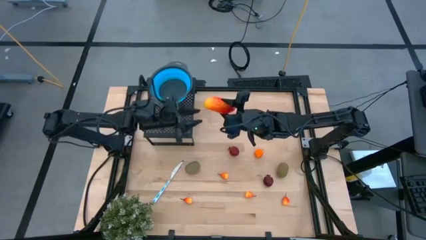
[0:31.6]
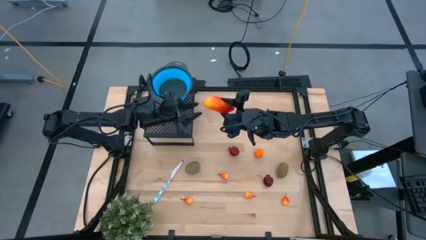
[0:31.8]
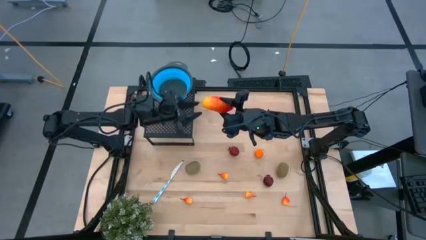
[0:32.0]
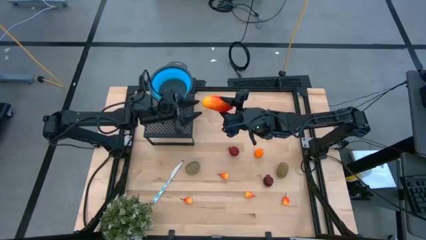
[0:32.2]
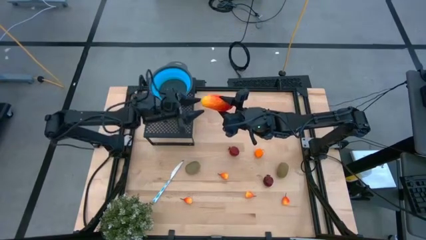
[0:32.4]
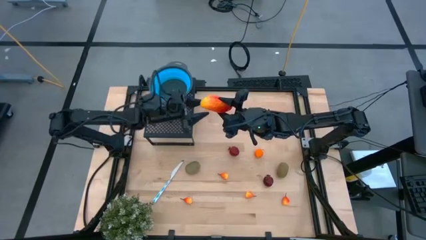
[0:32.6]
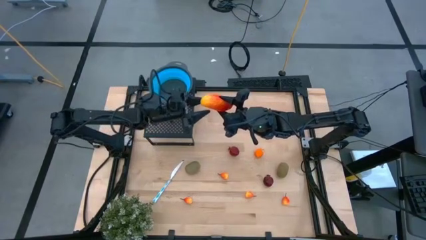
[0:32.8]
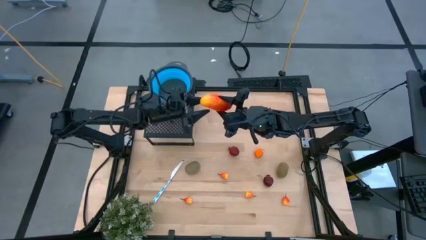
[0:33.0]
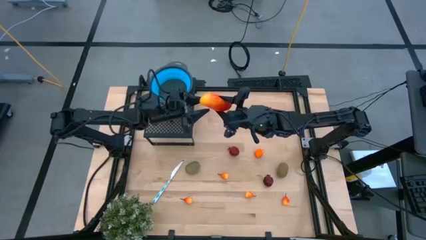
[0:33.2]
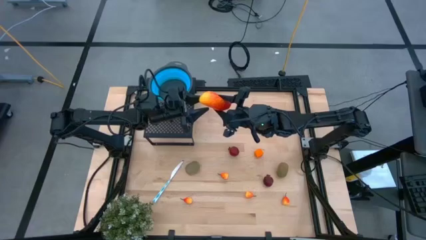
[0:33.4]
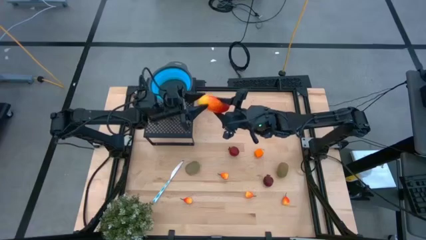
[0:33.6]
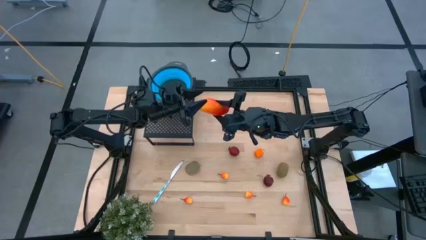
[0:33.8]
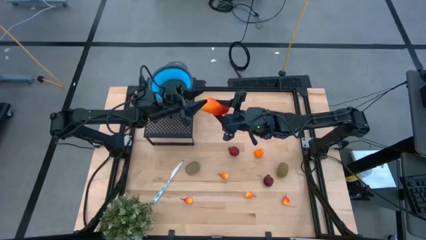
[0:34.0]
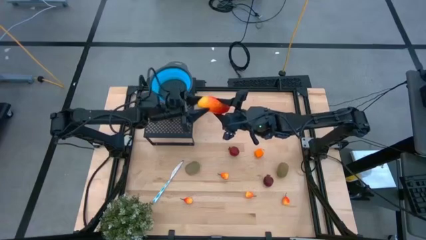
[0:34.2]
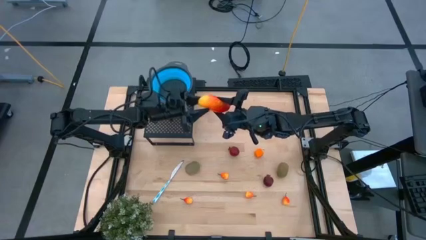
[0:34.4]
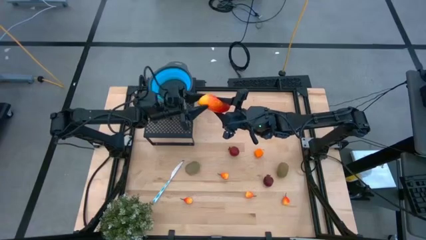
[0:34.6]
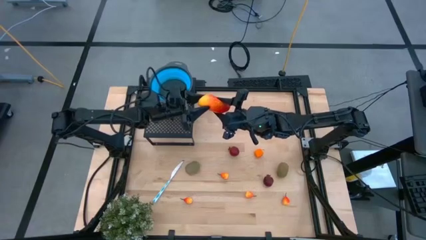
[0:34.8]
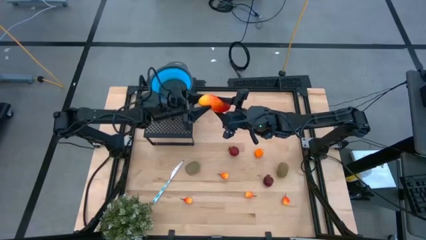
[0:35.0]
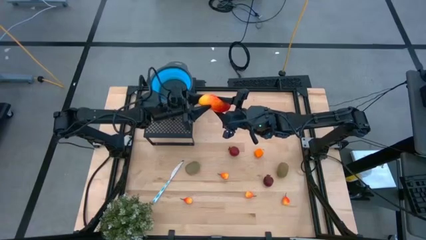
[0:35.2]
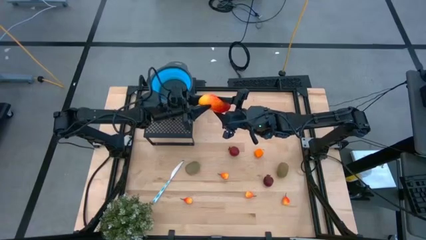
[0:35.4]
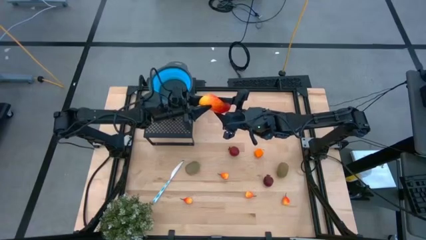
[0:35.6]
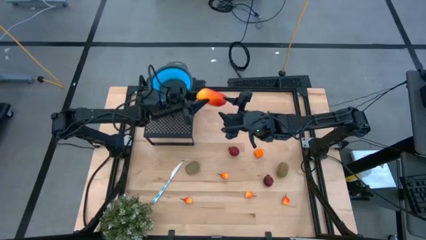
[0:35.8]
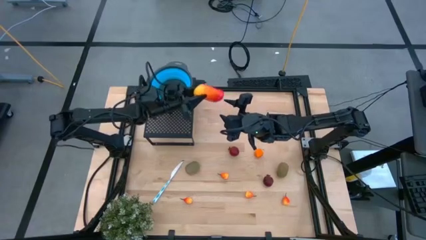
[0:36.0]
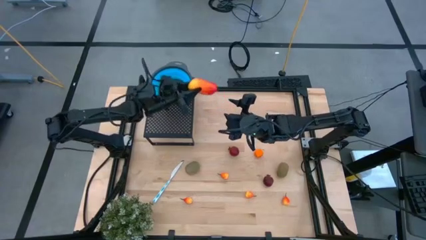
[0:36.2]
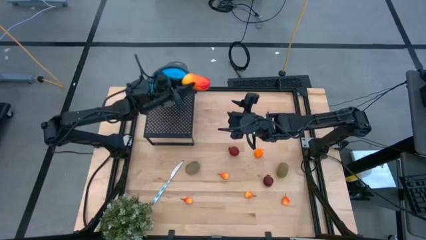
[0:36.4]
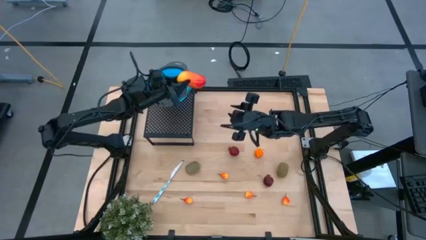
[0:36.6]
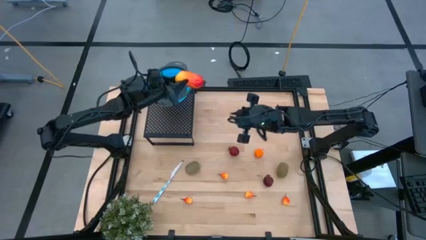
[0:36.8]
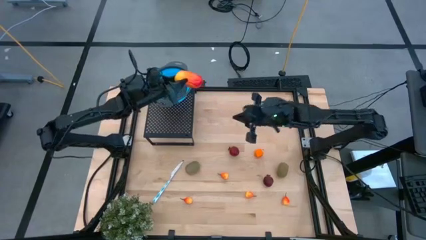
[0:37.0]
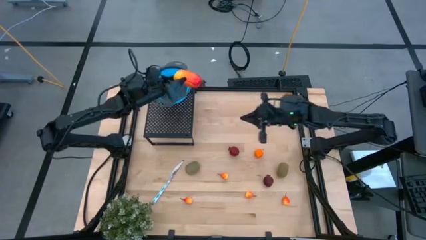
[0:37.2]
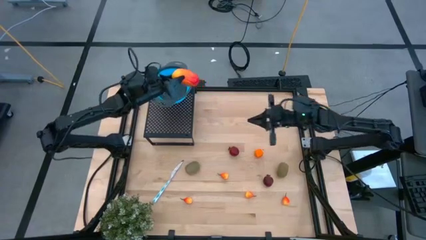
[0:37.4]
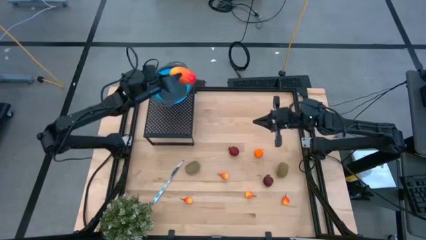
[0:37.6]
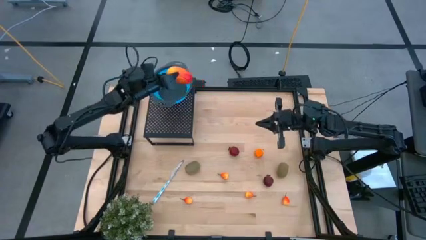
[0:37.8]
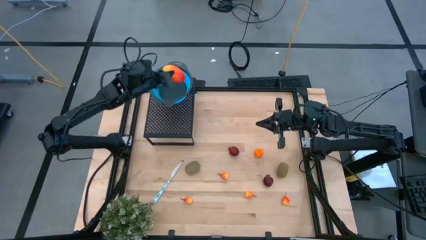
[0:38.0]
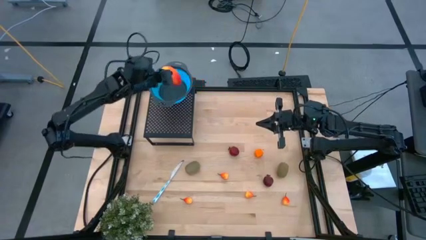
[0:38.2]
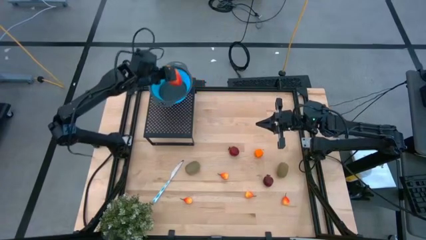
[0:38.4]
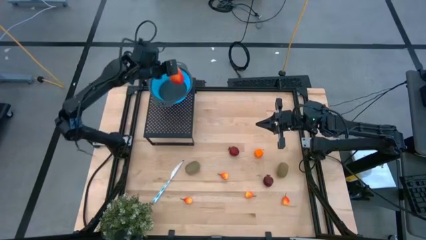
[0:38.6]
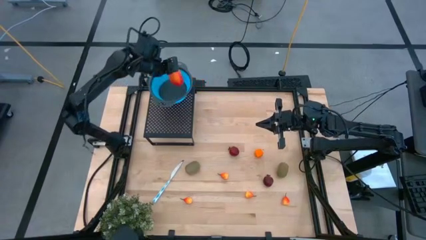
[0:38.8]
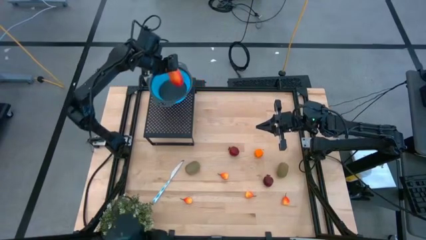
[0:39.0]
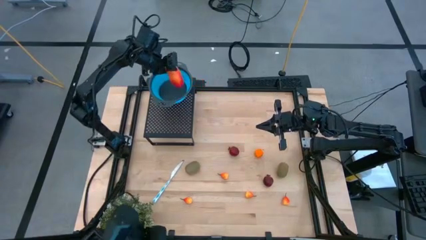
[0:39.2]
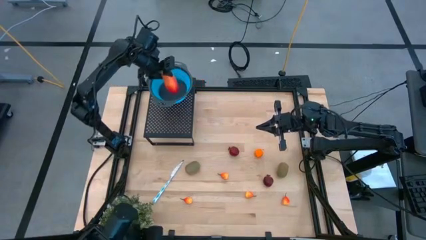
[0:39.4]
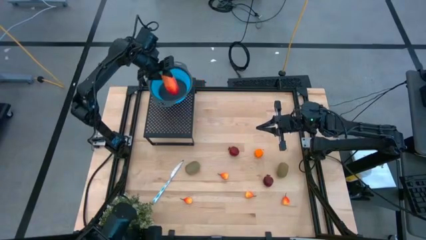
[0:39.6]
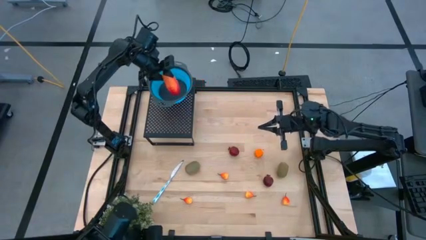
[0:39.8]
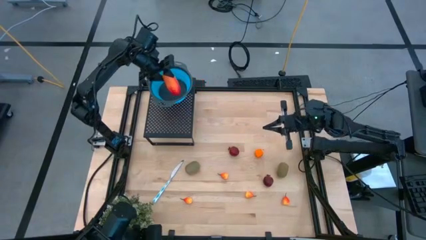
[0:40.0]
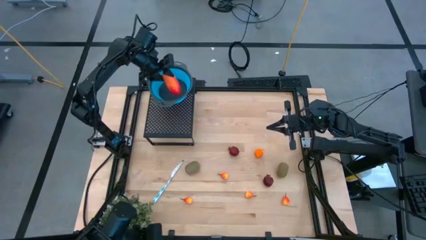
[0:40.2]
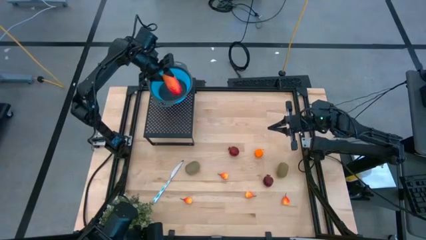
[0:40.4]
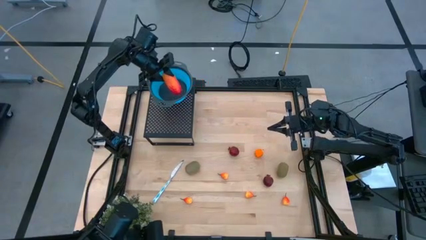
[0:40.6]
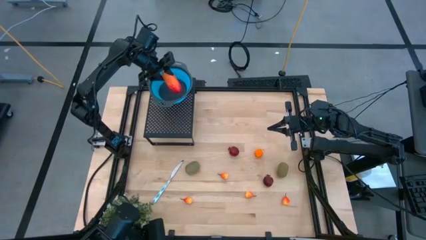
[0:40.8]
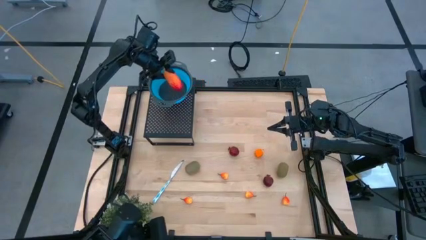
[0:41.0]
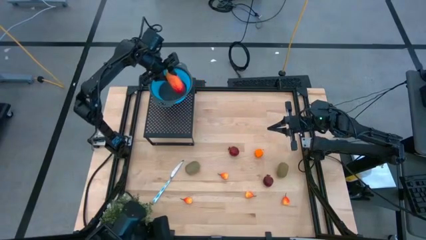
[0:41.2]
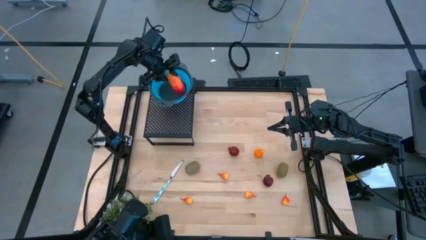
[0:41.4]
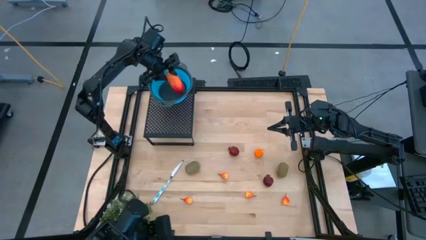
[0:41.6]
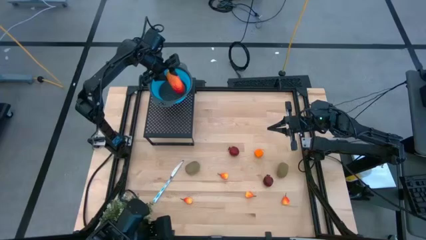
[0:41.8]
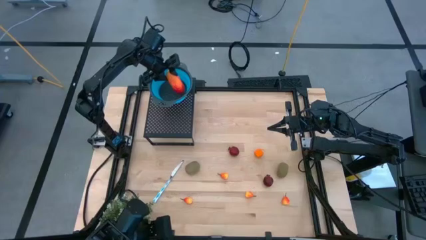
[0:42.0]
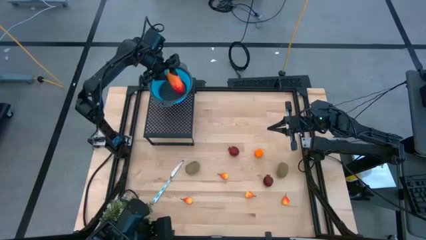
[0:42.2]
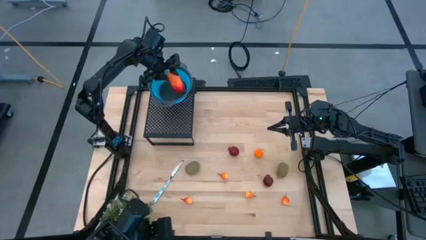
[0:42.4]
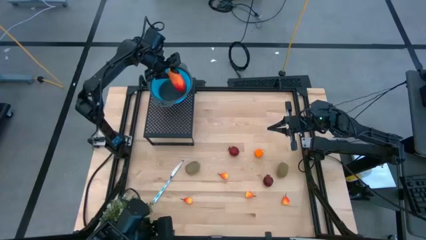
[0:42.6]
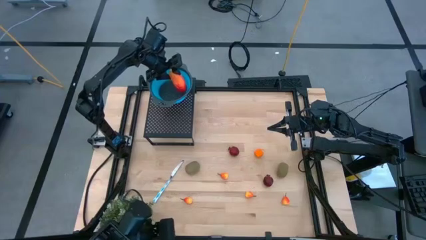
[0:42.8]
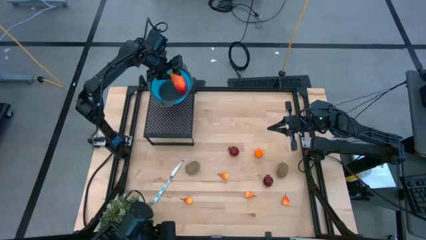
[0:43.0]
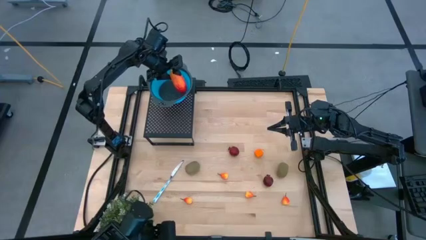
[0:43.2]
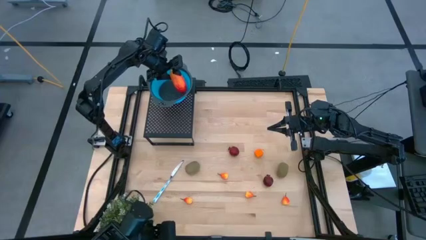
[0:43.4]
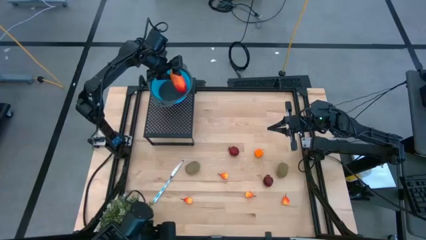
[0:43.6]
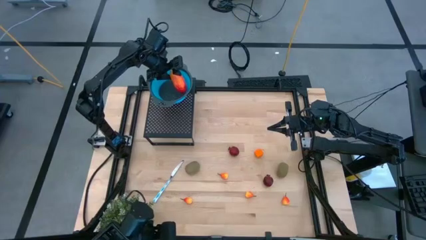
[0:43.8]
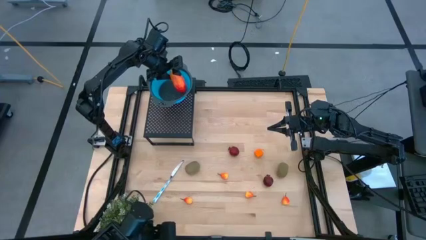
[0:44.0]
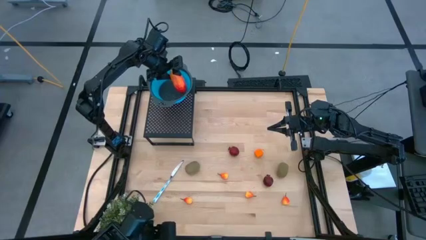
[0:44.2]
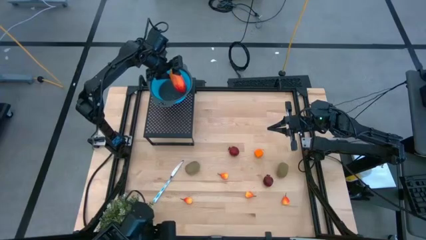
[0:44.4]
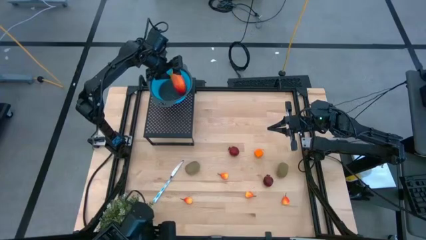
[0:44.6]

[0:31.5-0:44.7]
Task: Pick & Place Fruit
Put the red mango into the blue strainer bowl on the shelf

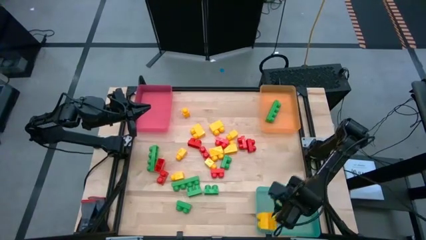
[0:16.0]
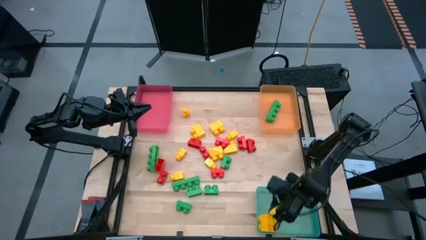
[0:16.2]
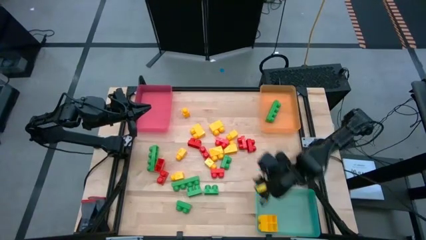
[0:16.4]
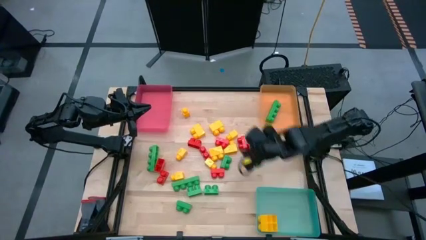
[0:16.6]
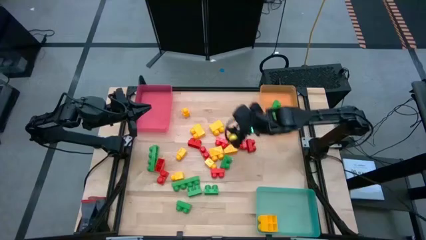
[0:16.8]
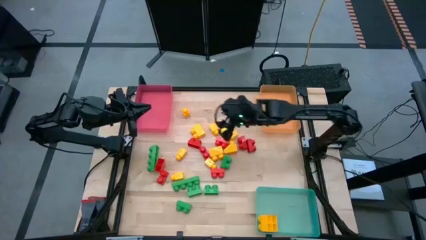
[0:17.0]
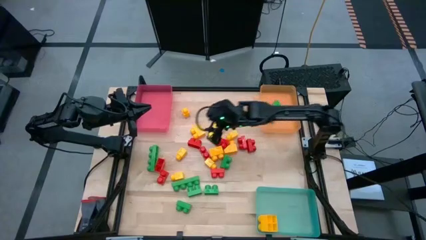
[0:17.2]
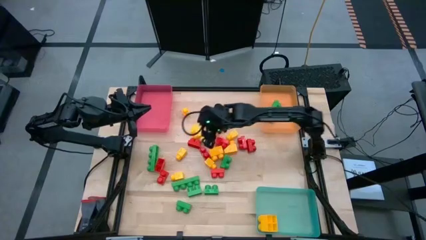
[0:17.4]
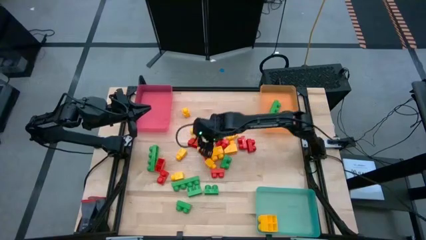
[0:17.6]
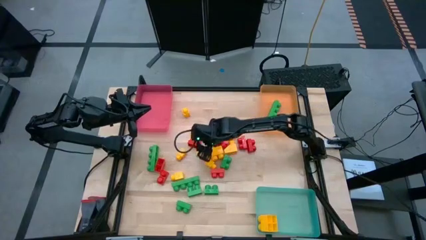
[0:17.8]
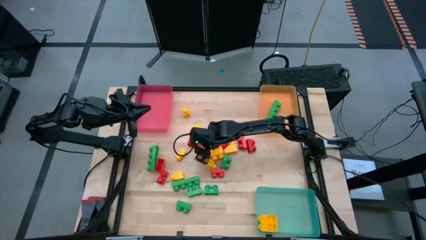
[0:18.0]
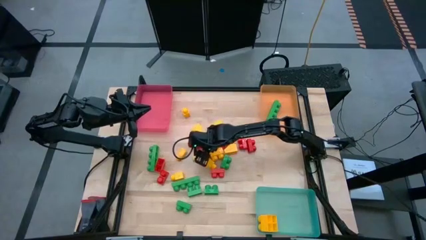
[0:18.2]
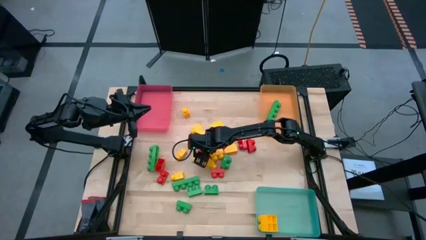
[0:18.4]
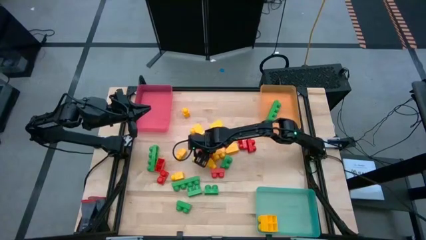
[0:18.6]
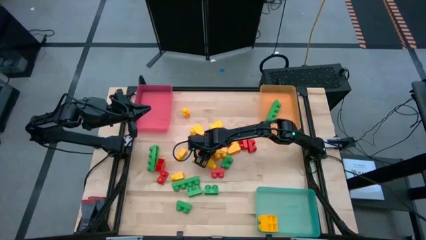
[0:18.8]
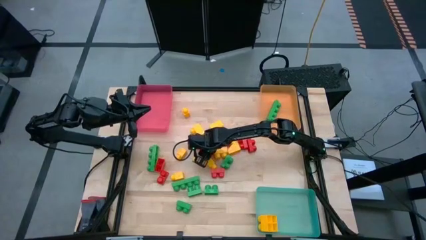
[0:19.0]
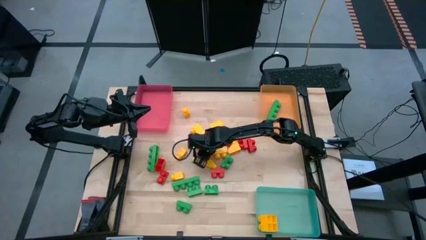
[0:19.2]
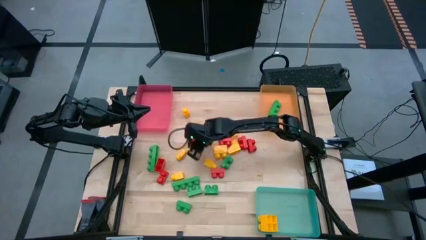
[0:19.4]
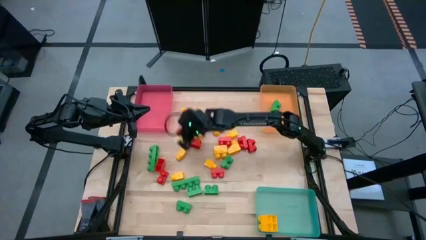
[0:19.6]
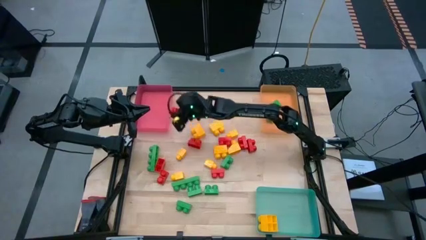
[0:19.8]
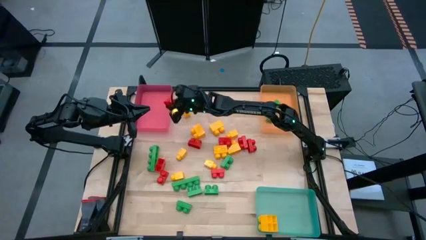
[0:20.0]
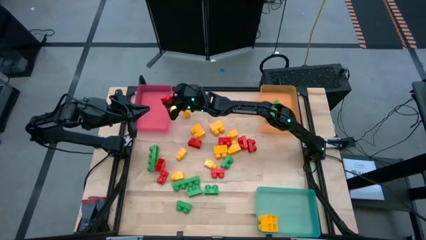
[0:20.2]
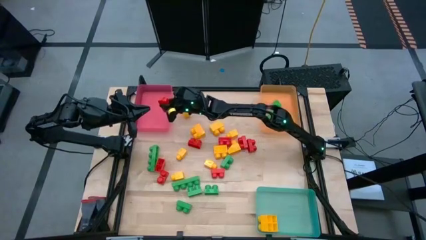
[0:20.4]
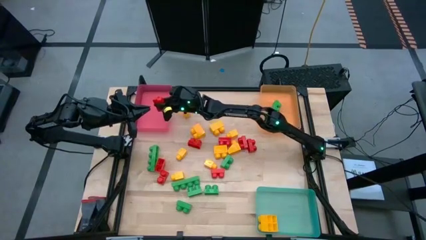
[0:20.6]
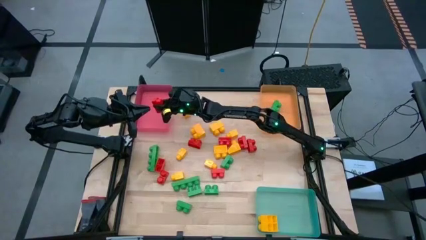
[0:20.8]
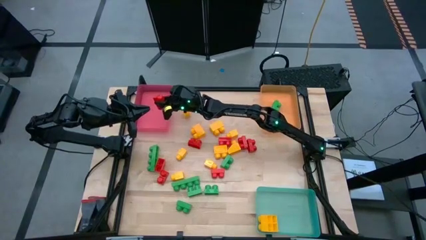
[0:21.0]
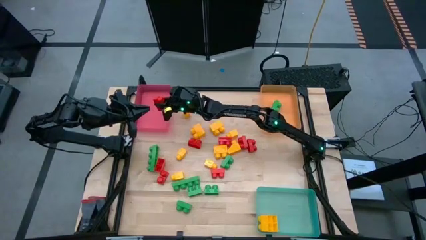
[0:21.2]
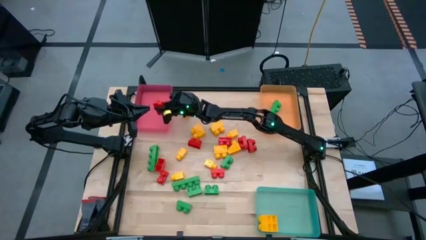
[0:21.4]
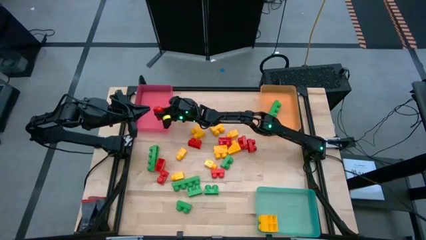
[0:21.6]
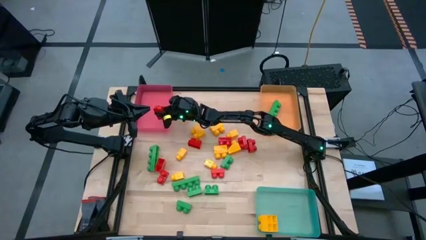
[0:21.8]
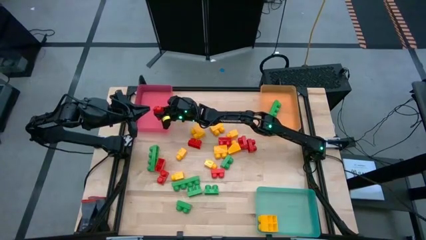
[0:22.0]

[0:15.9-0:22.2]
Task: Sort blocks
Put the red game piece into the red bin
